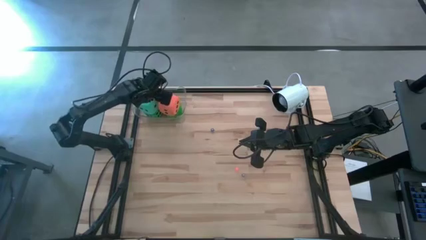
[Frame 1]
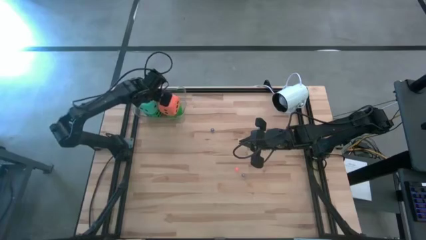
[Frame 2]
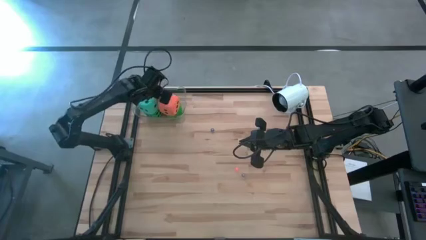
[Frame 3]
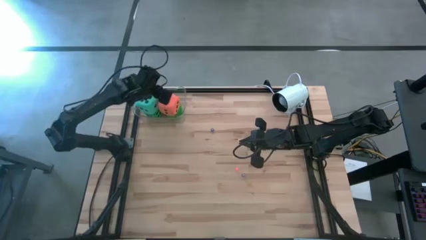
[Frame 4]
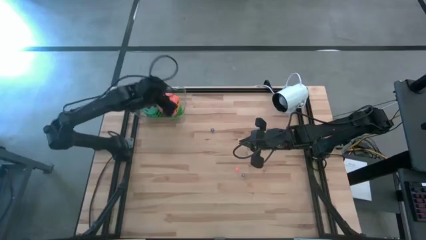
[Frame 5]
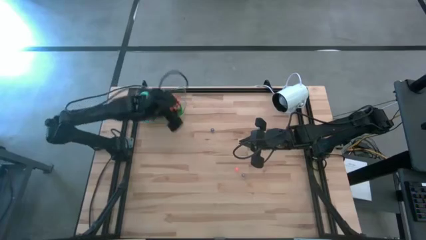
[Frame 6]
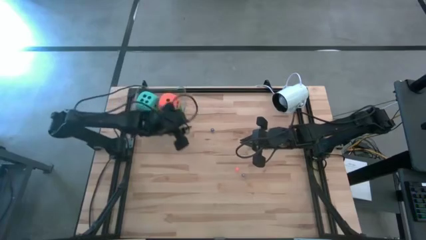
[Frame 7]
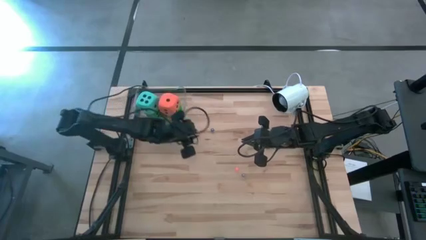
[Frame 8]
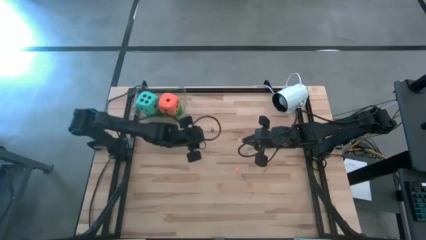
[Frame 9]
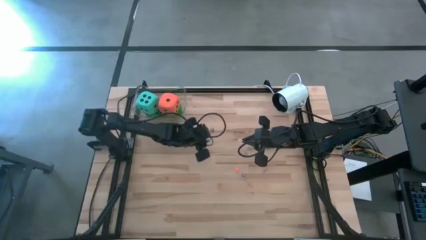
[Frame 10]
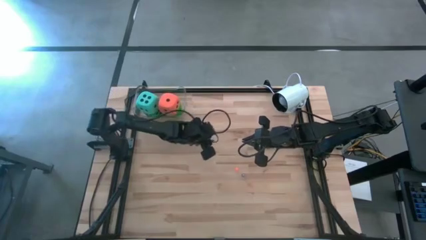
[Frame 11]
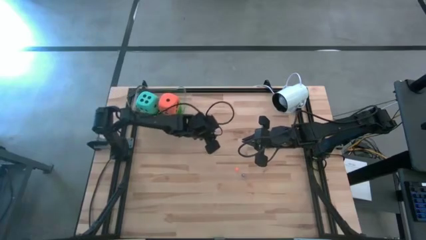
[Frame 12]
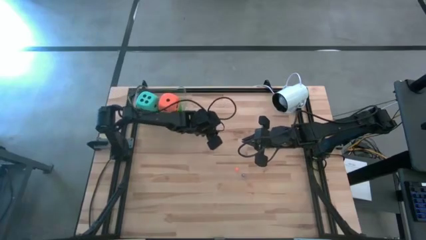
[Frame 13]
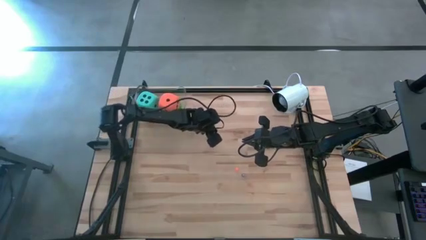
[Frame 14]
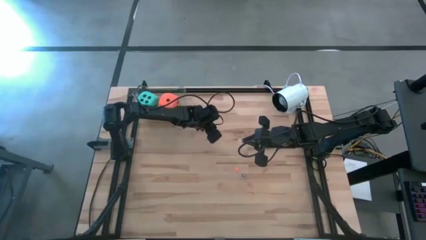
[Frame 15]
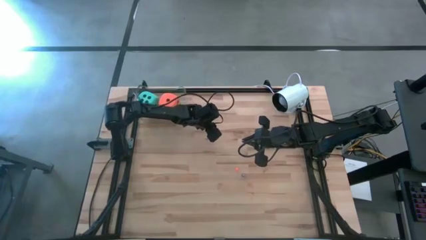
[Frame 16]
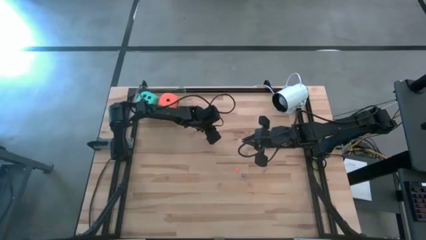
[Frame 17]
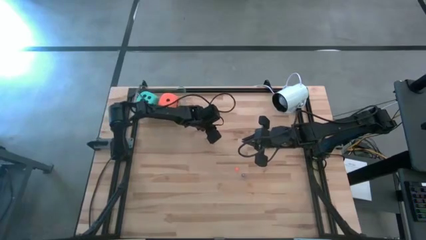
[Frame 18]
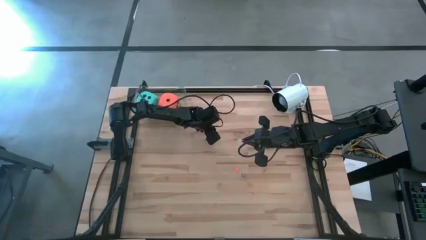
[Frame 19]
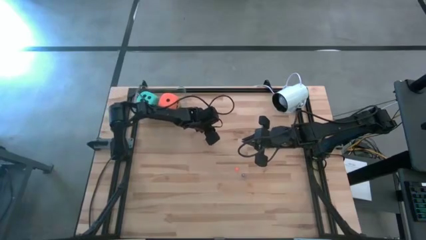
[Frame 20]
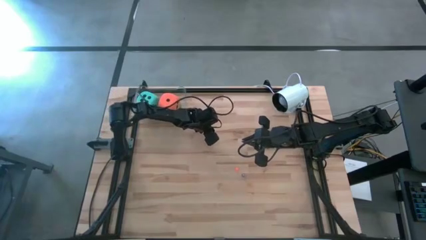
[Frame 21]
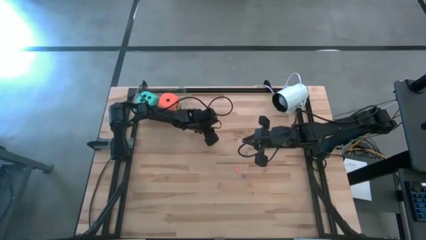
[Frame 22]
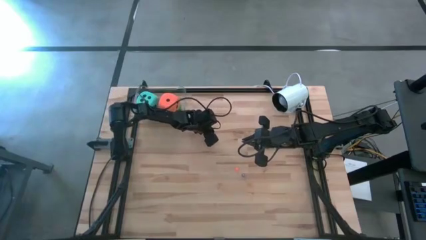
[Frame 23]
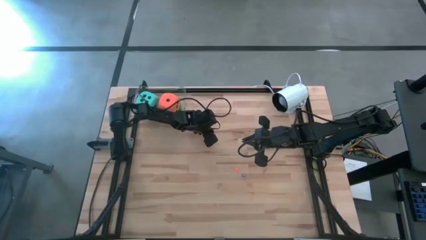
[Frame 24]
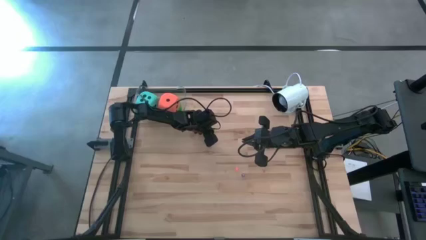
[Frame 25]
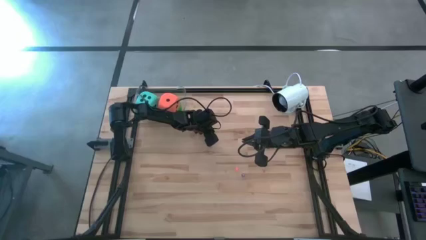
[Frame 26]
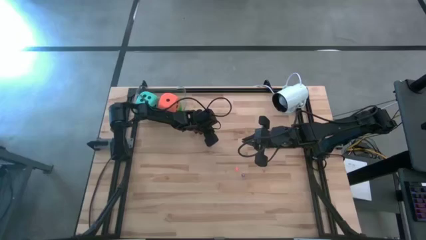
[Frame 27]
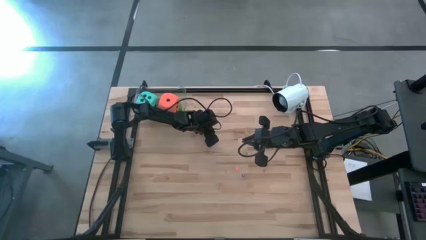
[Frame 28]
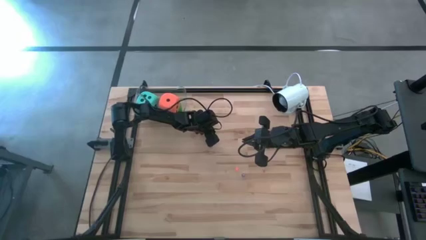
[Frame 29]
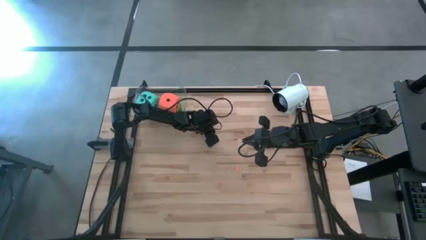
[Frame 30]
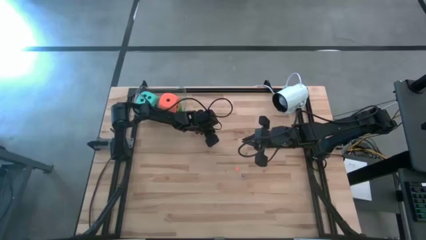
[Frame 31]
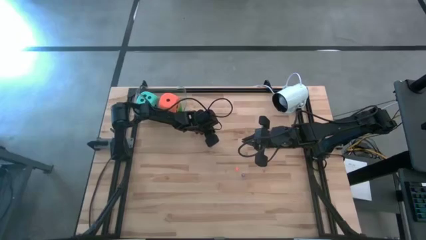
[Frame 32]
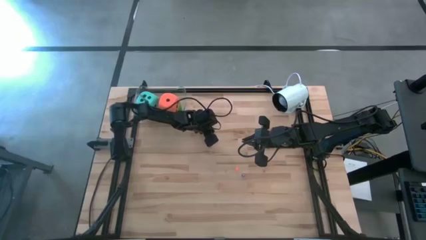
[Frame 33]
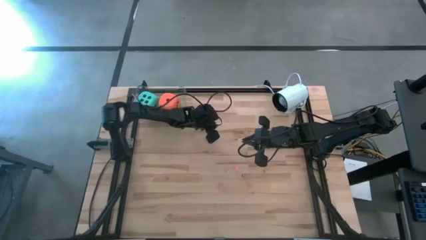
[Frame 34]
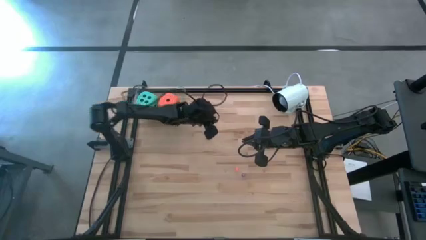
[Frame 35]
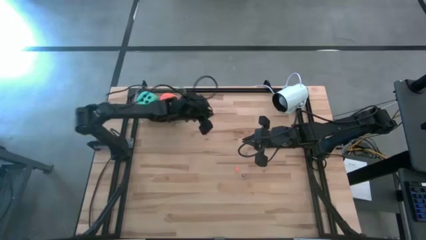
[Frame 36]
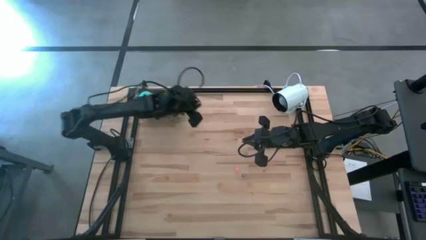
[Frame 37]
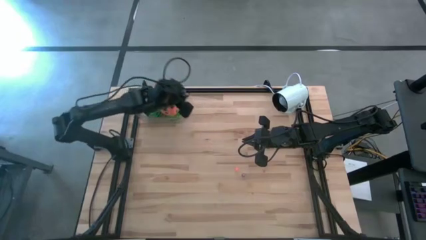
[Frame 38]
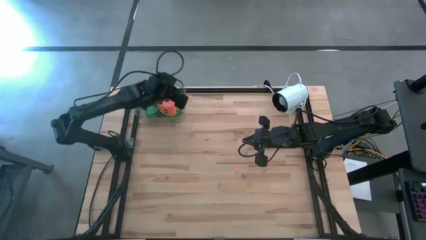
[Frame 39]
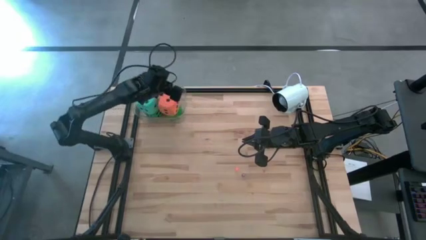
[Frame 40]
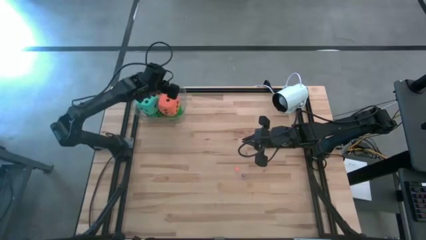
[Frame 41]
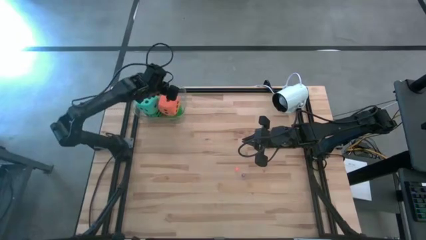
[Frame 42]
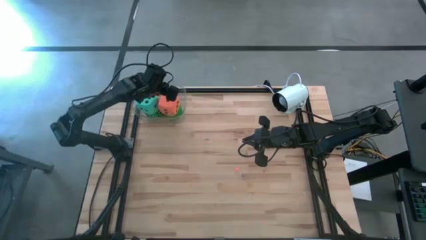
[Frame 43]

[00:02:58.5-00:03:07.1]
Task: Pick & Place Dice
Put the small blue die into the transparent bin

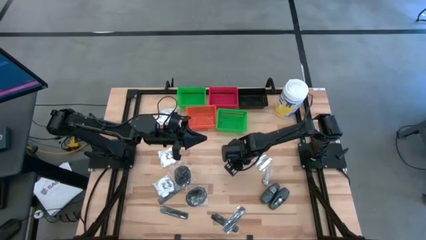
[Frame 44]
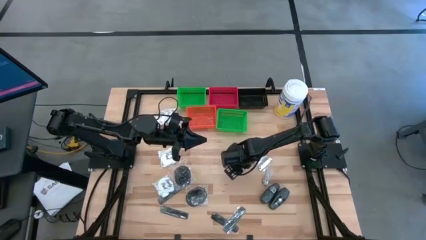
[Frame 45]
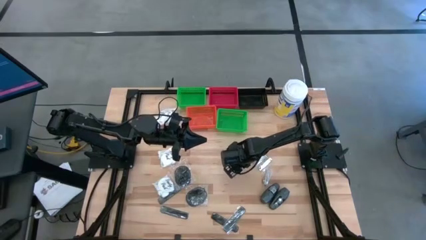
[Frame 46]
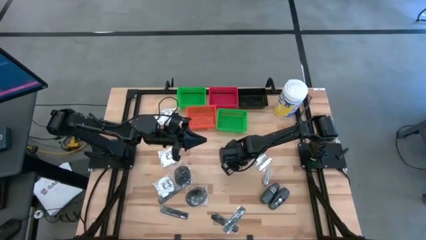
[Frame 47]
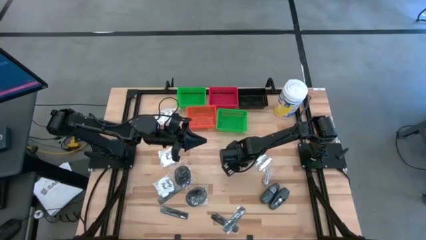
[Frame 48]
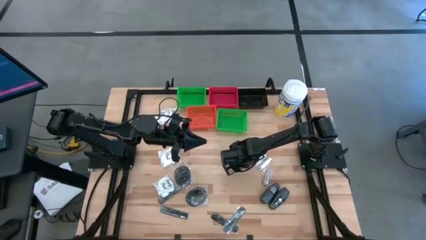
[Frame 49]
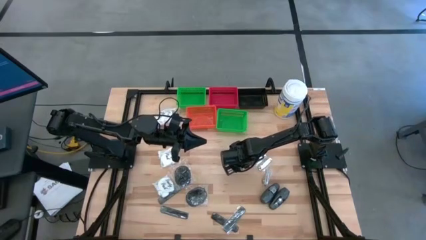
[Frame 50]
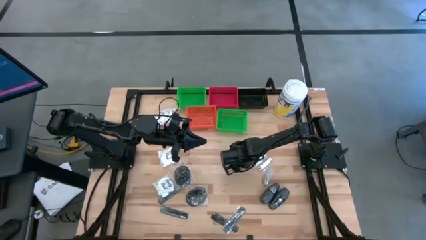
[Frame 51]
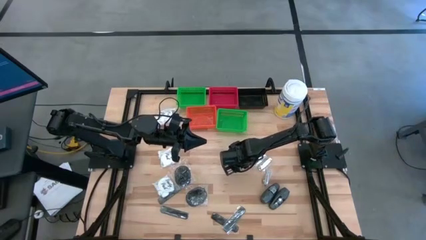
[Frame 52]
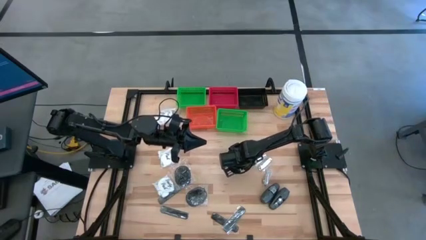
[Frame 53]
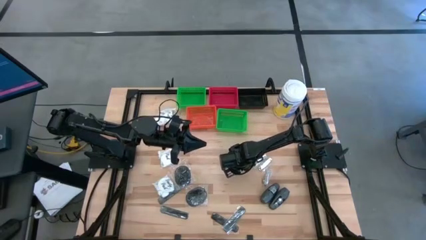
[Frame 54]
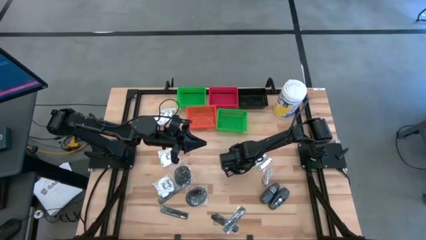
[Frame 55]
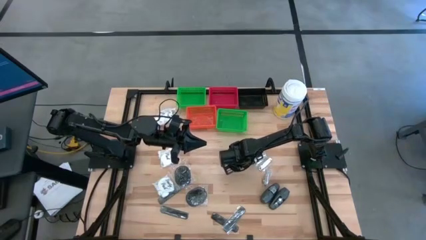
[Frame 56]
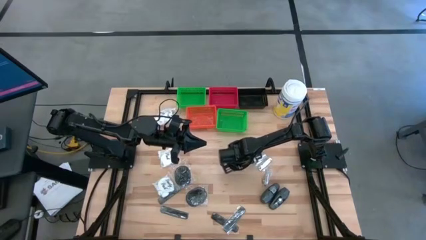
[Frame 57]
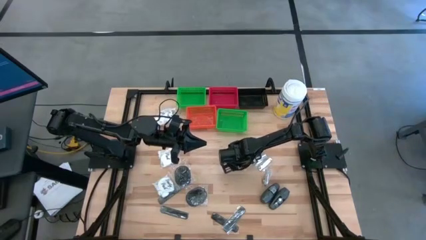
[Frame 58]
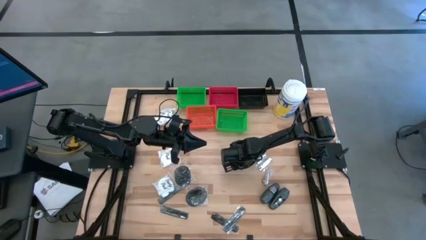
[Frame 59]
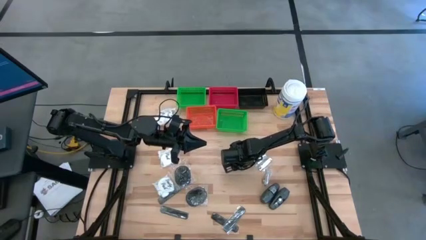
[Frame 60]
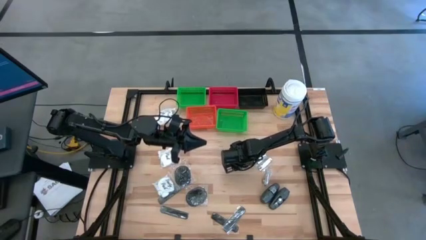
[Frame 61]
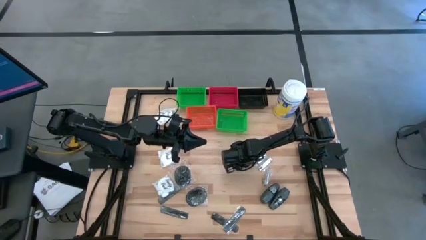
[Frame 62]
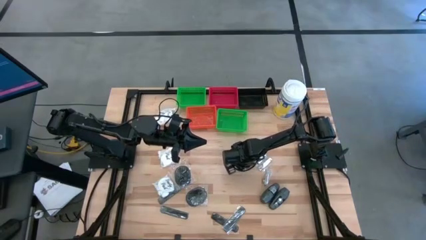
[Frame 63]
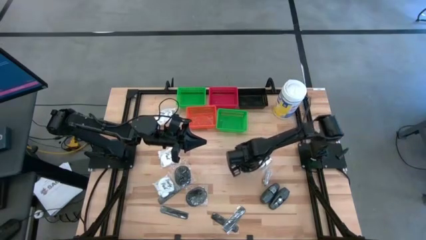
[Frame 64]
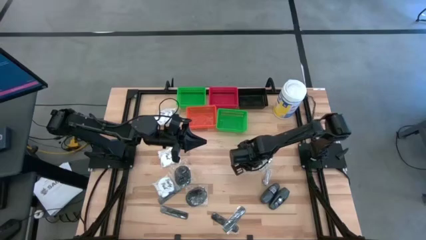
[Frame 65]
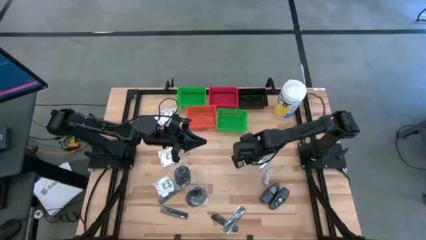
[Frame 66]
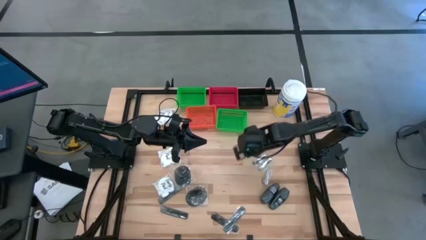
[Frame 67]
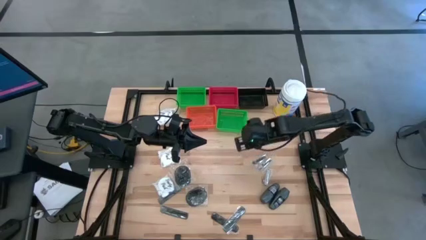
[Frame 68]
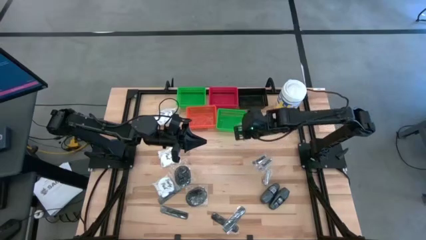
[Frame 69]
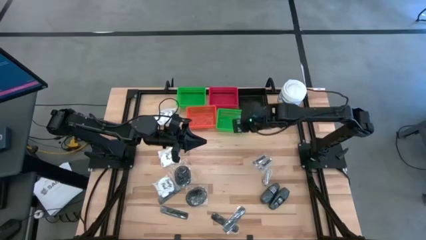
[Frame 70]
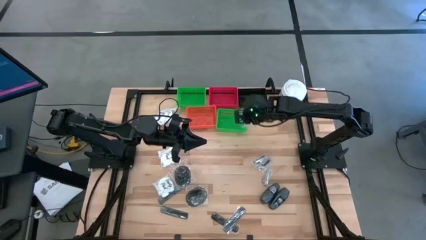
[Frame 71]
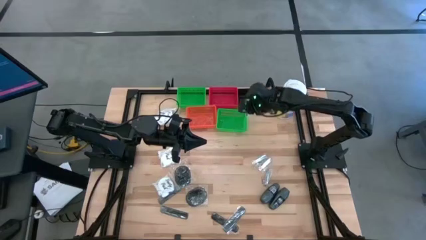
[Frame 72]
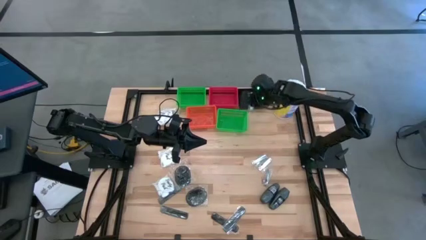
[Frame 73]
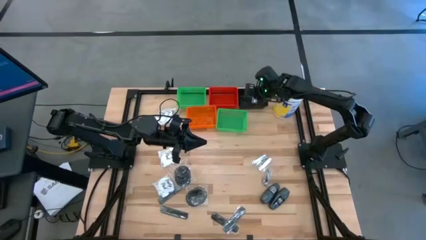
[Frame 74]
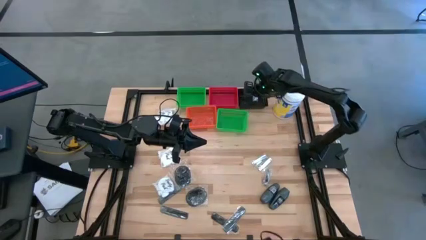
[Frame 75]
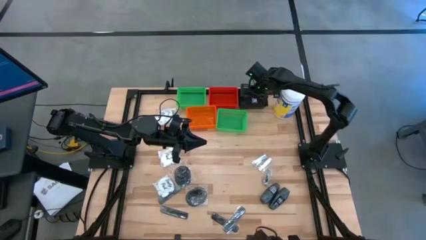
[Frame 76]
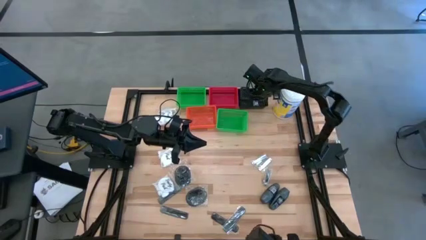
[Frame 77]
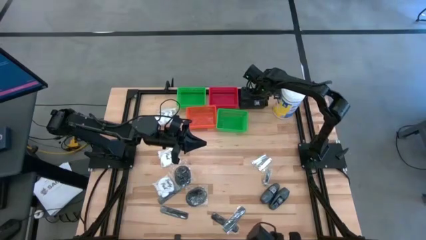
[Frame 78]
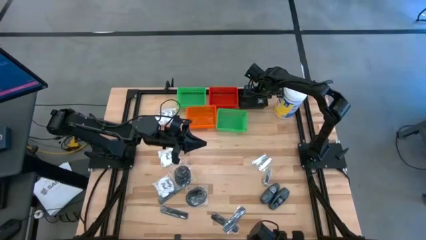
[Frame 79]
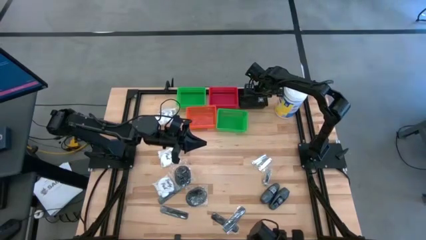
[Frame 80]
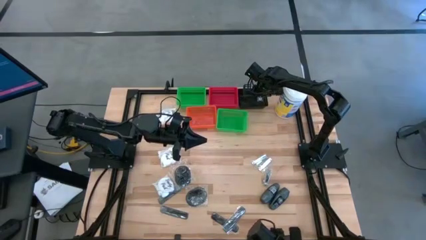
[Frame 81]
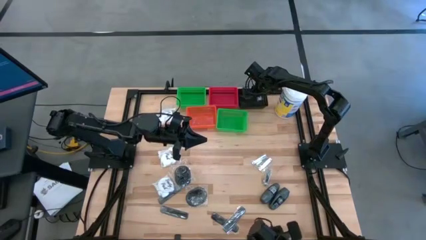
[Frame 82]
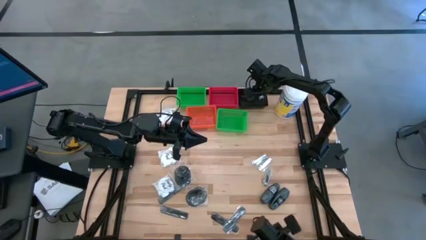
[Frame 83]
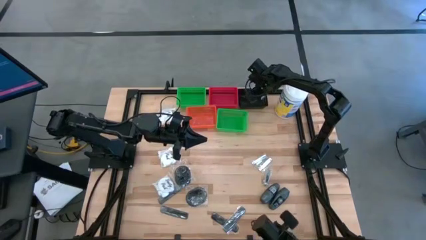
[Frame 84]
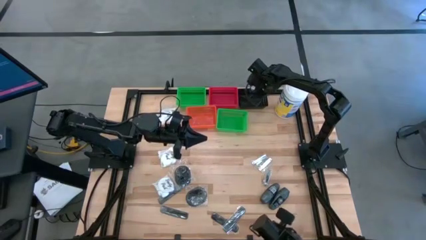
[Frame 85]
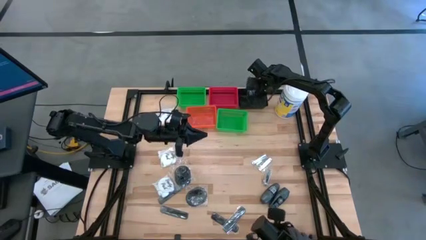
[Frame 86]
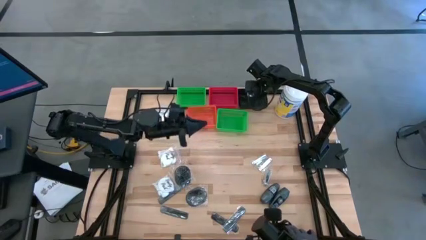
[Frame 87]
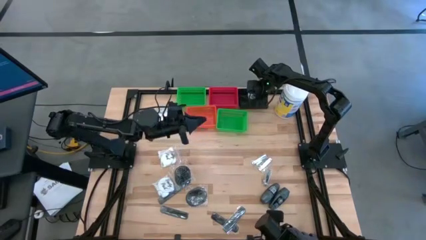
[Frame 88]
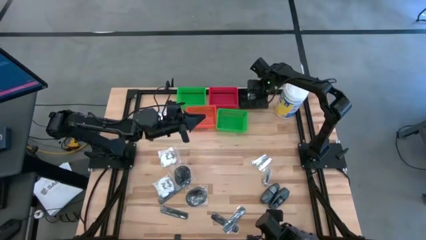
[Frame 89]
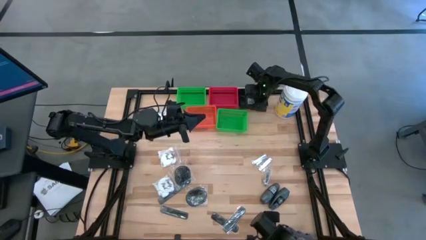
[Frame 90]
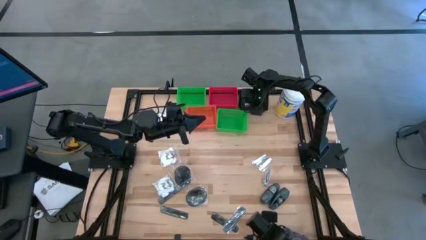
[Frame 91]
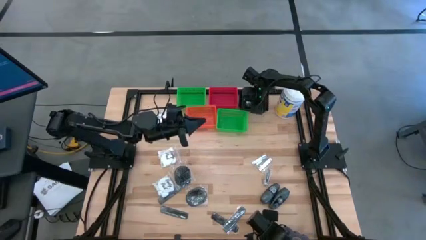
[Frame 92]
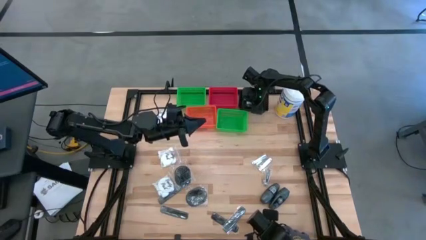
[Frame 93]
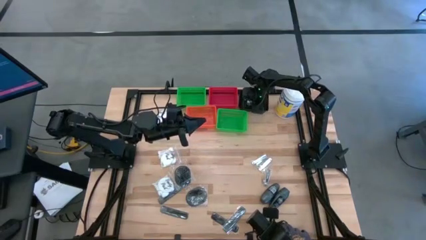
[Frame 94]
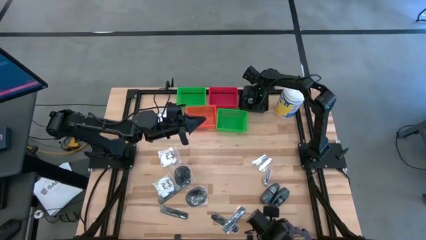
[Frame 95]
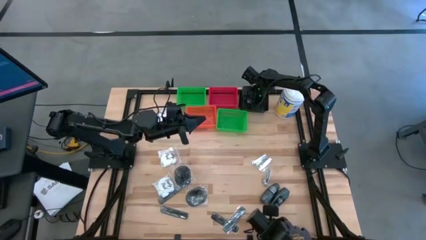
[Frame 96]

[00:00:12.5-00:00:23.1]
Task: Pick & Place Travel size toiletries
Put the nail cutter into the black bin
